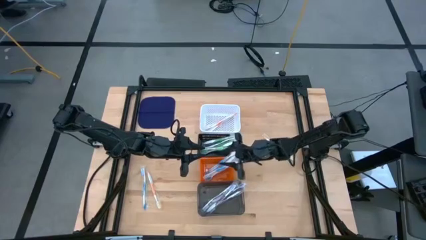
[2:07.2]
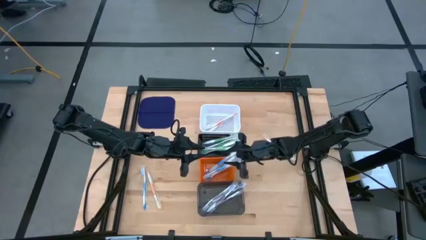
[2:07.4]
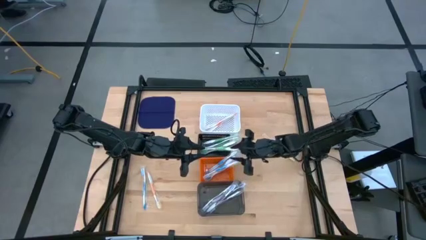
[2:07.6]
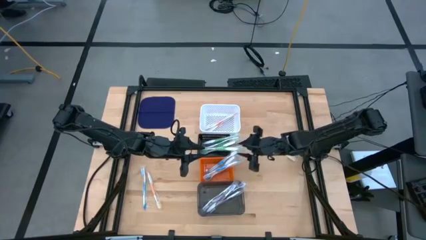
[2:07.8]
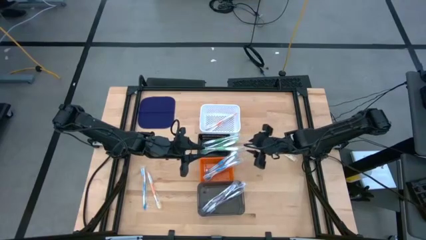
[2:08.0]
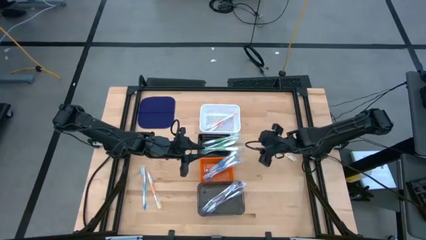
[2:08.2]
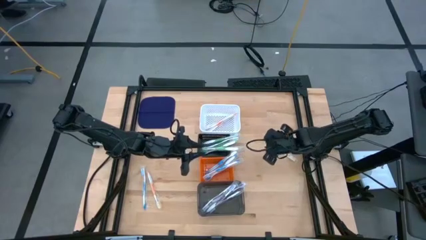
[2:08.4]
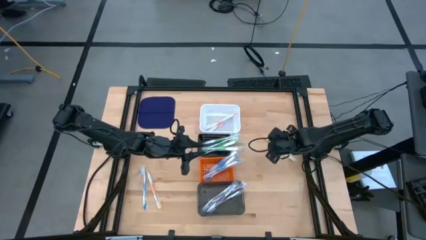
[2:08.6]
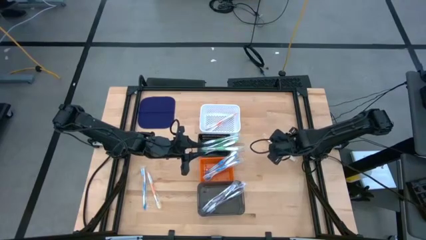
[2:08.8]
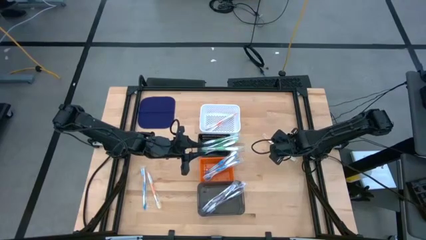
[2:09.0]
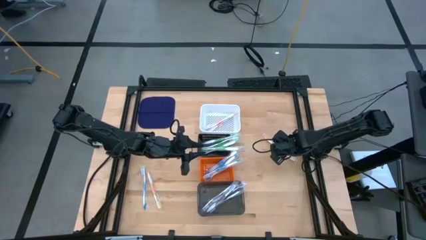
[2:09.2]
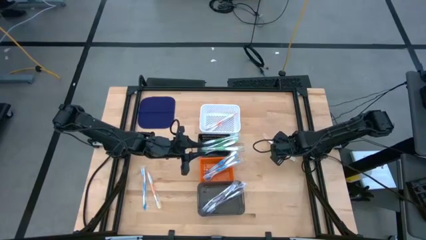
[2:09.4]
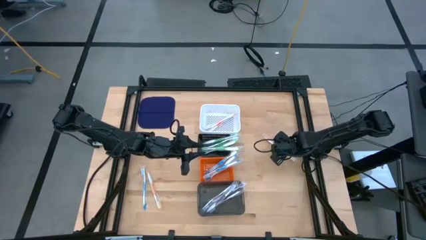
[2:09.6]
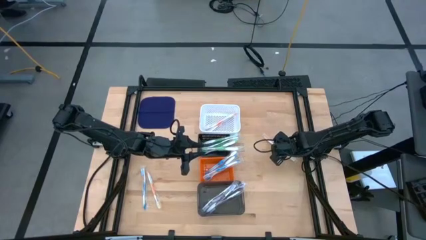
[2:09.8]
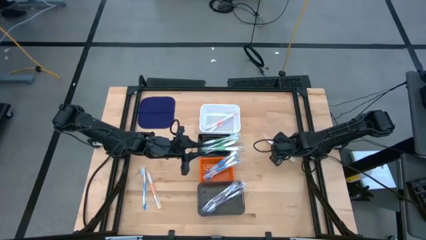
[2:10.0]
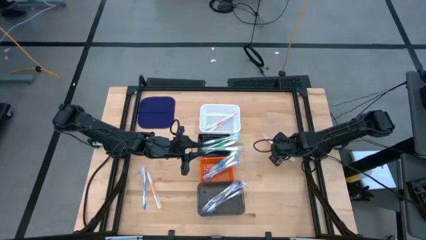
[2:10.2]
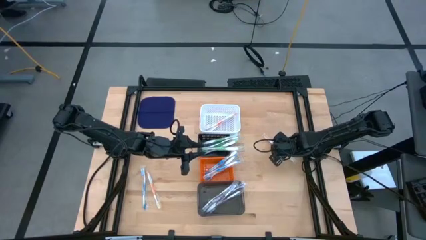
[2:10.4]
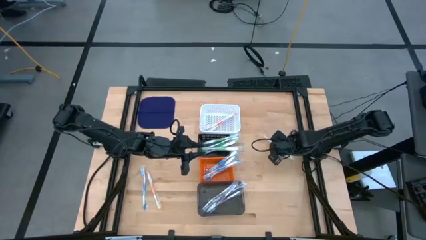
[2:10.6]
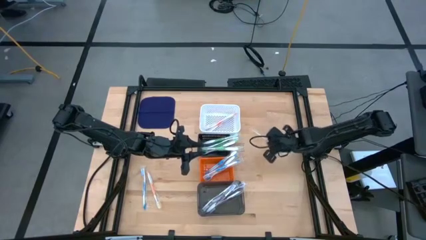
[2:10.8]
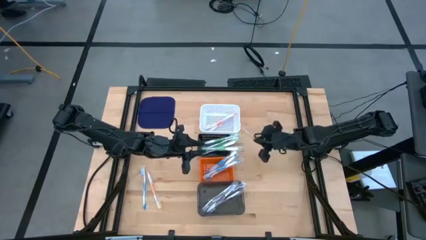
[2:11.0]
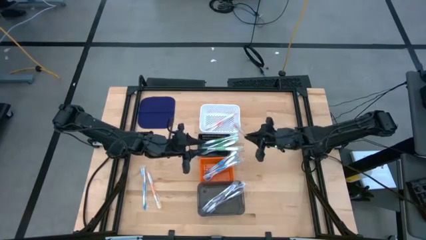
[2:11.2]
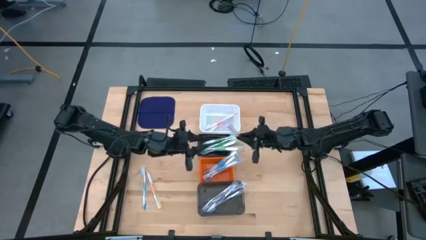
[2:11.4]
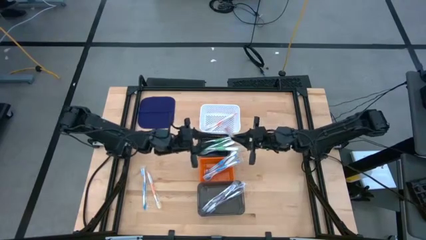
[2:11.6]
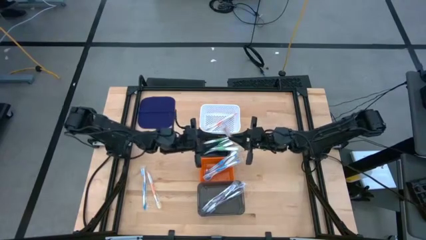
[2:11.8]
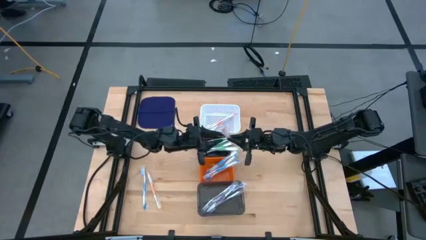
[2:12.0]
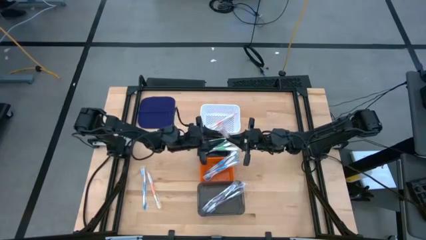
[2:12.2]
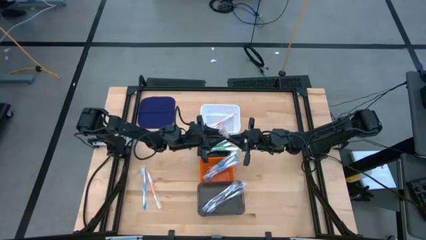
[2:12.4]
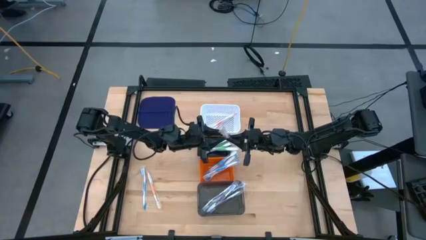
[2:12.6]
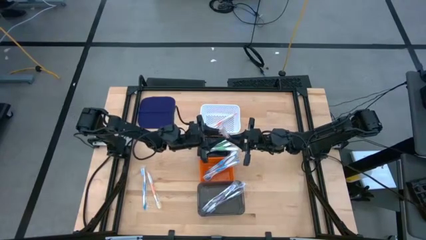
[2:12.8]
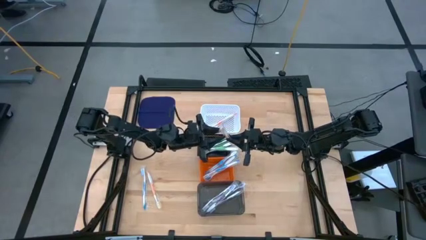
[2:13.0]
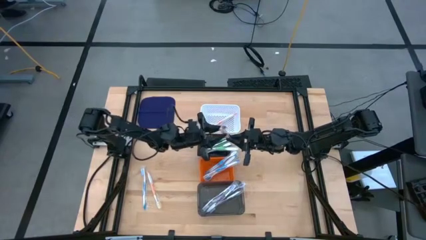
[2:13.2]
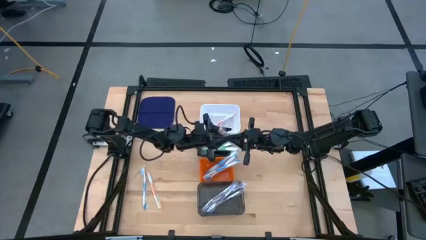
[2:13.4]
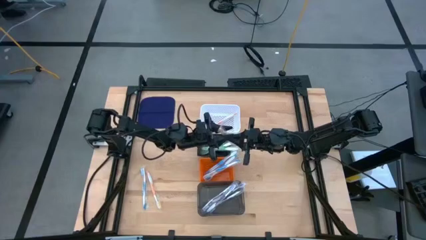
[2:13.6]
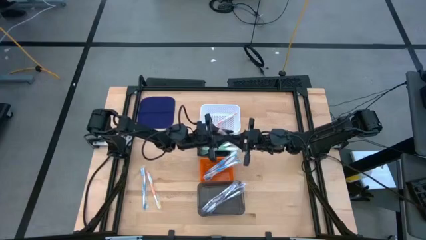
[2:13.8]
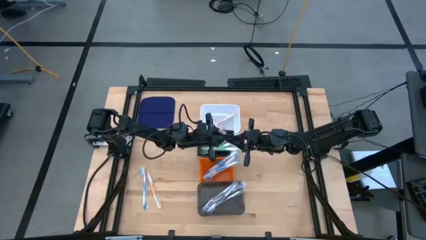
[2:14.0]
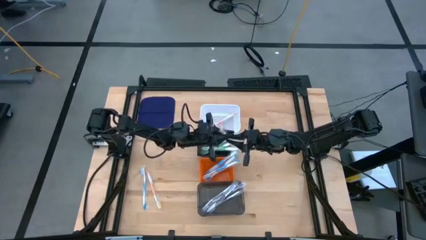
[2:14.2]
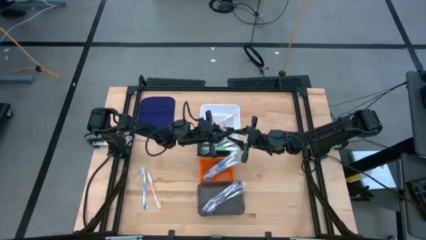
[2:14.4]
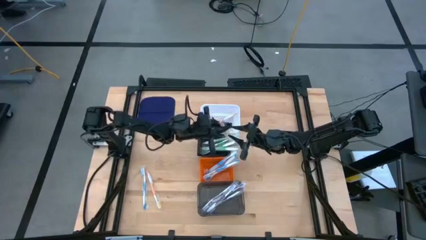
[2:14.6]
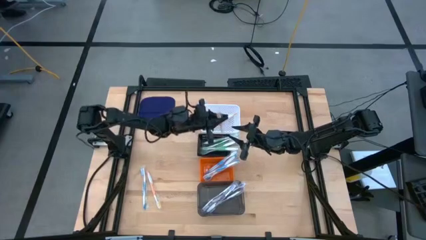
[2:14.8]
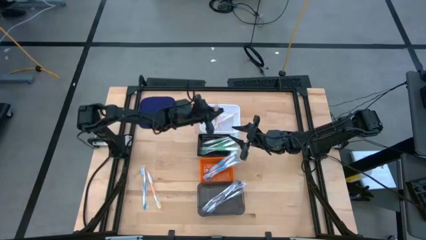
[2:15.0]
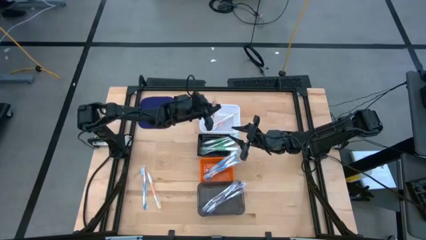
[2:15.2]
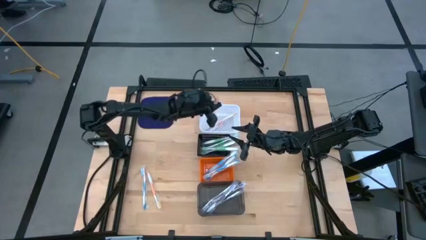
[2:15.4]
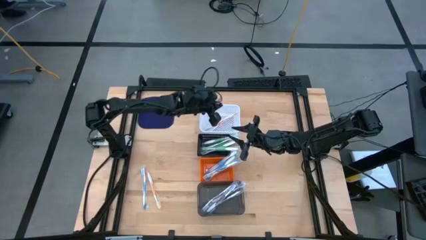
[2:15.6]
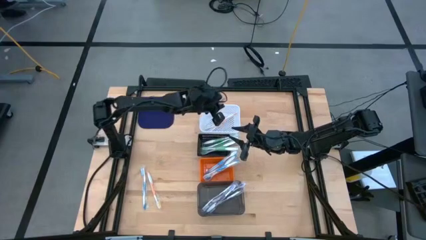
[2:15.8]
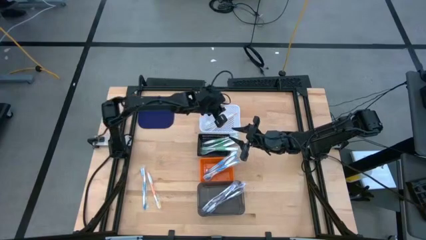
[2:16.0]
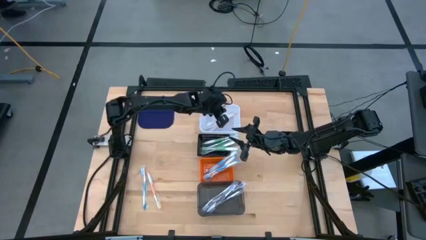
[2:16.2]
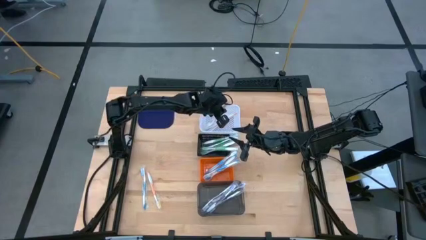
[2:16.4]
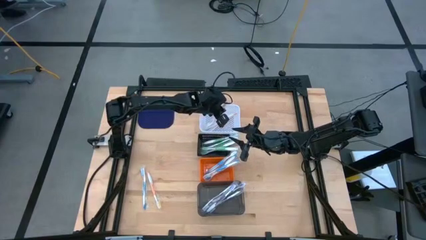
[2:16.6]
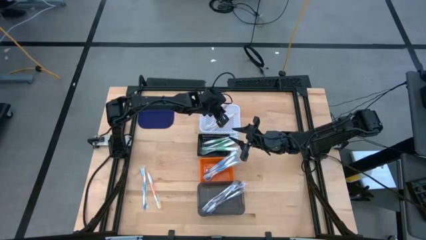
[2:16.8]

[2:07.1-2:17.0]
Task: Pick & Place Toothbrushes
Put the orange toothbrush into the white basket

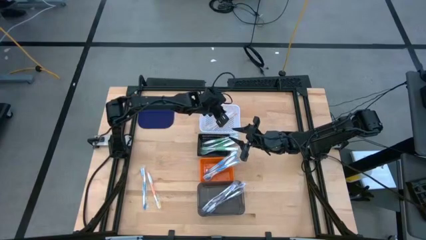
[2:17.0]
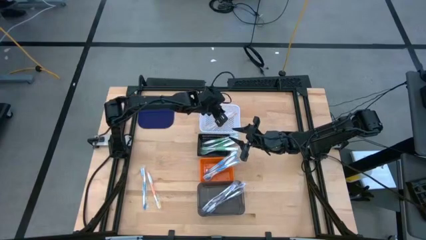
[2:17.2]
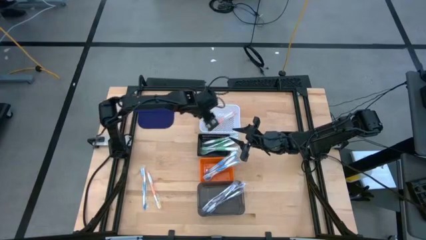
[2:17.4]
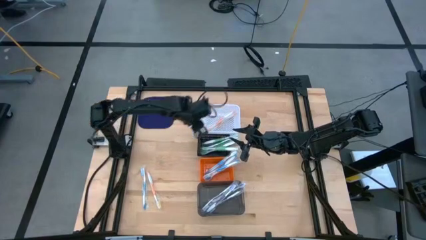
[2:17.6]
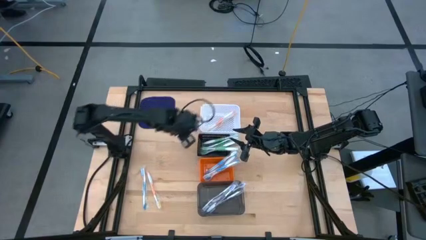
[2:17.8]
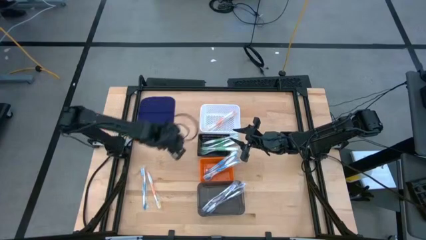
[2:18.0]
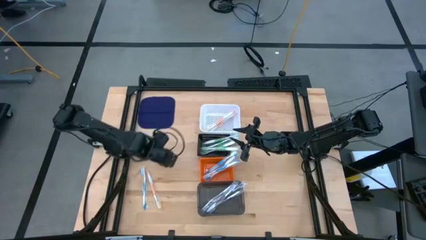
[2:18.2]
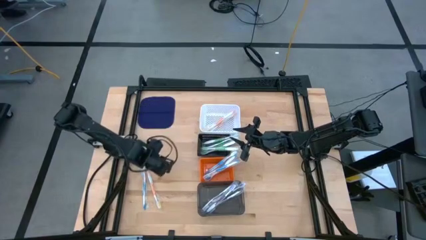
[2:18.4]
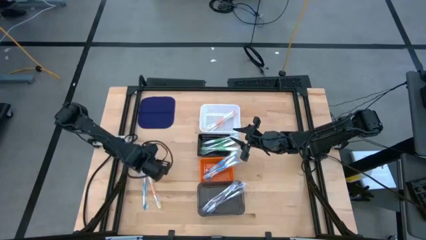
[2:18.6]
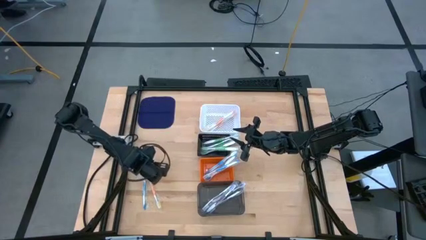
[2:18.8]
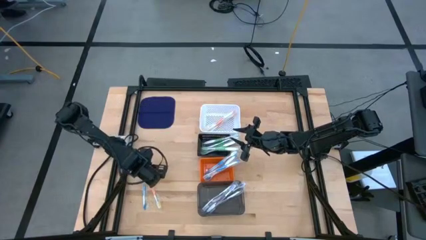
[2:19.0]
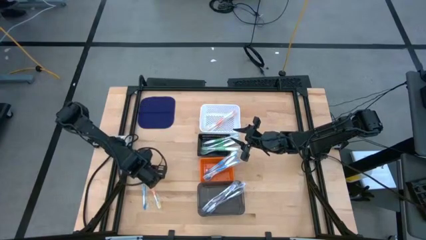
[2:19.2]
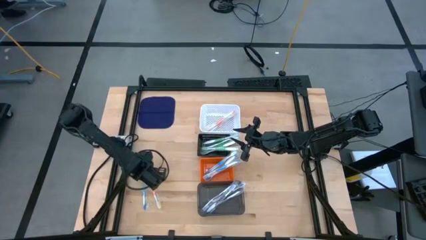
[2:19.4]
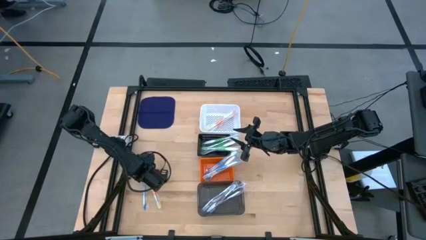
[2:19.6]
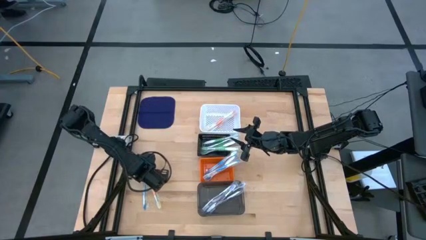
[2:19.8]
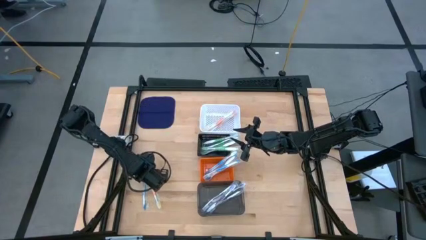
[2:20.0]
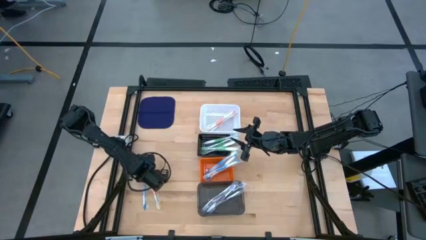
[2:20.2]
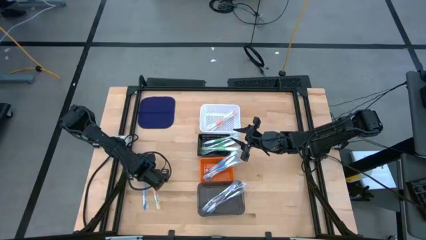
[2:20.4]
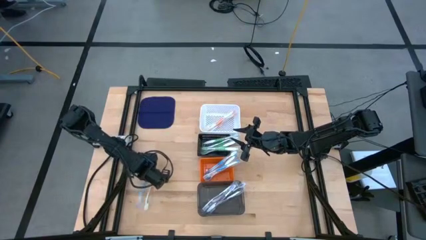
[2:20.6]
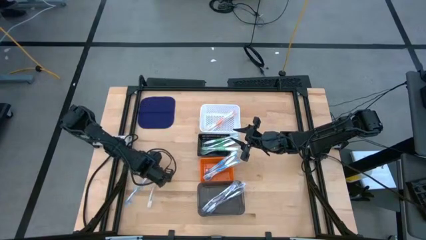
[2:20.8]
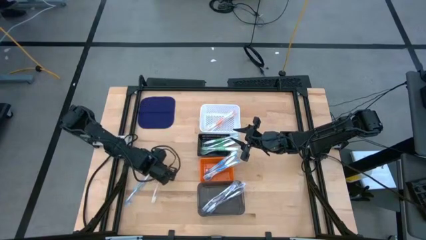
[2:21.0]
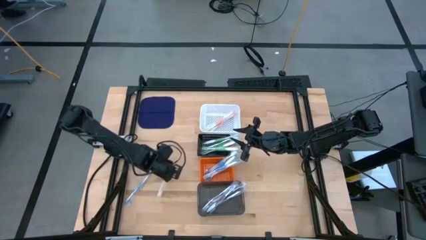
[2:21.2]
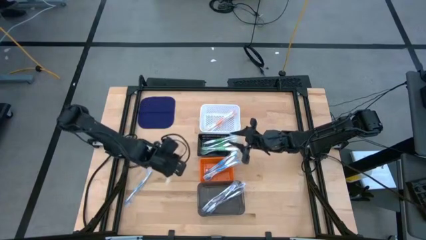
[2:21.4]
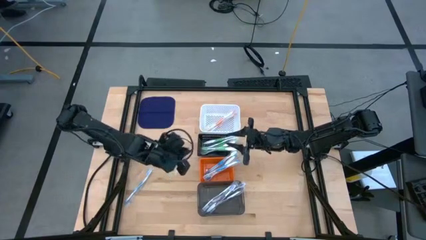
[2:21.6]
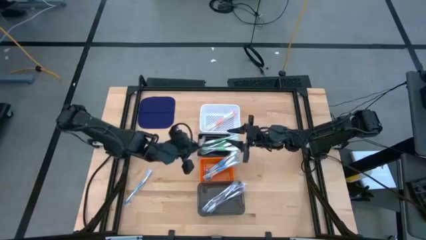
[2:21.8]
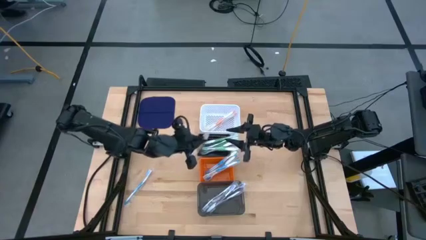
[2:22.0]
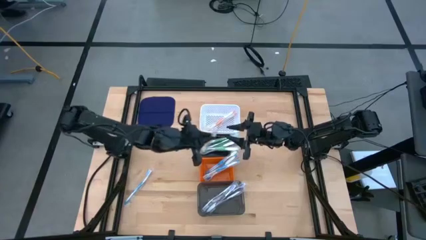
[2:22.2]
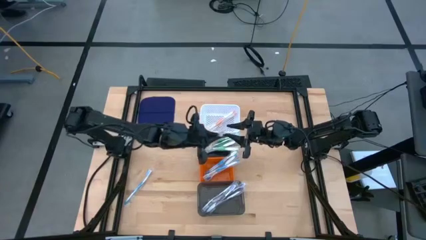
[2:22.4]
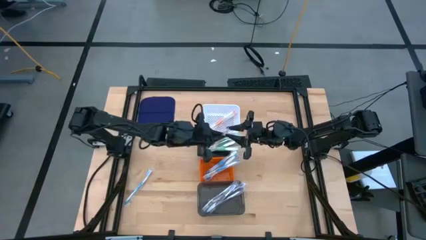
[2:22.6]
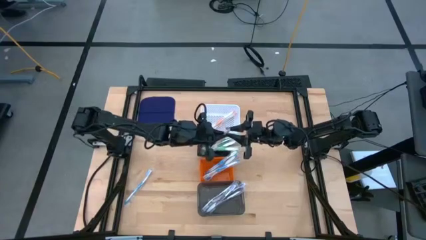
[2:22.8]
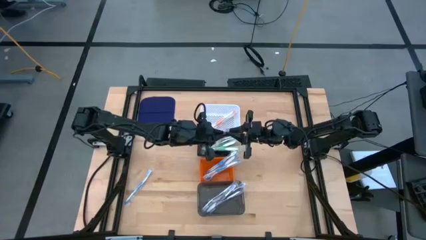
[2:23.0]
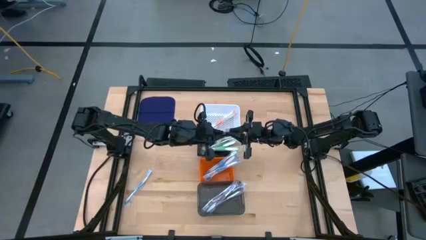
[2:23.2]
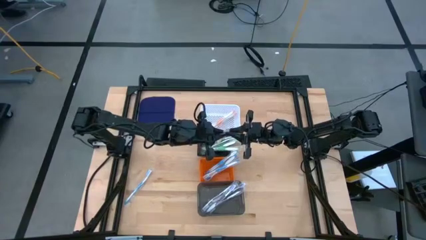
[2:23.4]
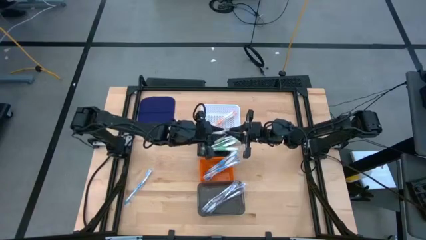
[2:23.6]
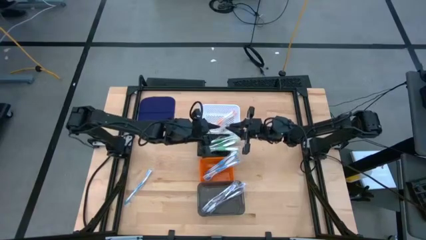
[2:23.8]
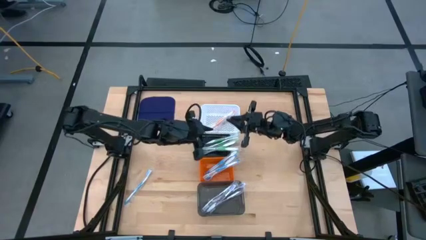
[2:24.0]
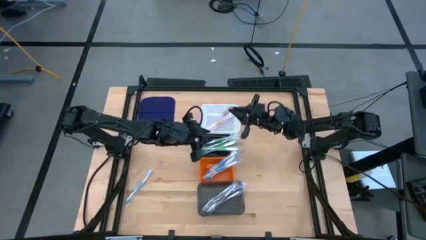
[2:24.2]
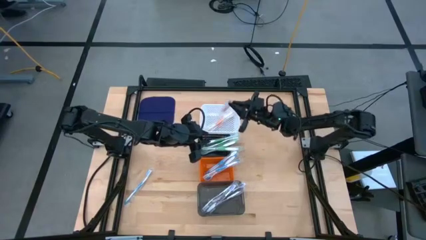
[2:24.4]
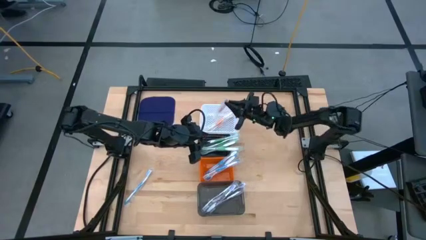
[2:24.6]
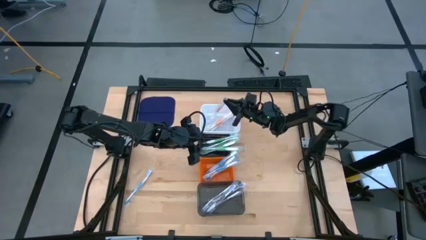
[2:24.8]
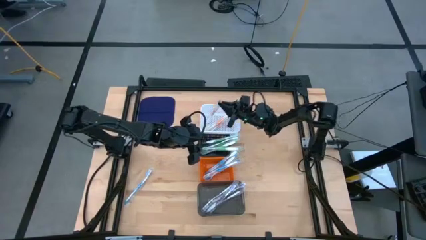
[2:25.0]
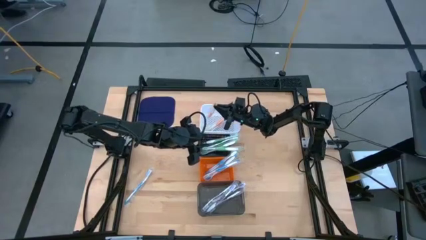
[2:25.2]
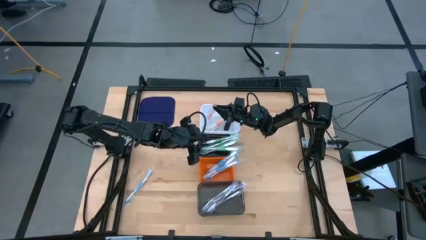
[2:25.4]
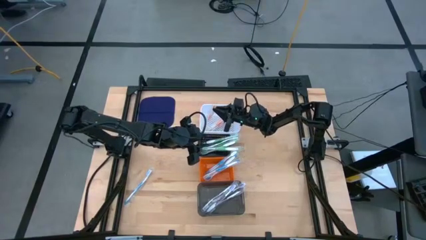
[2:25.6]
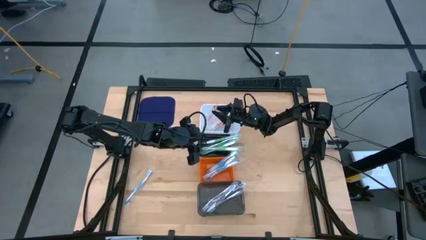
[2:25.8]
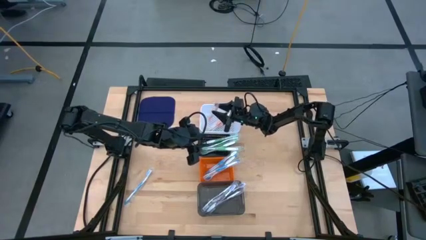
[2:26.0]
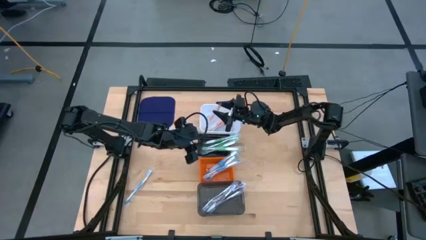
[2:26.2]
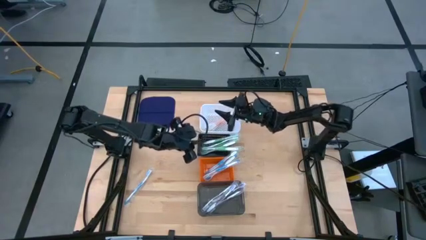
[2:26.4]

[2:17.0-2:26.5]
Put the orange toothbrush into the white basket
